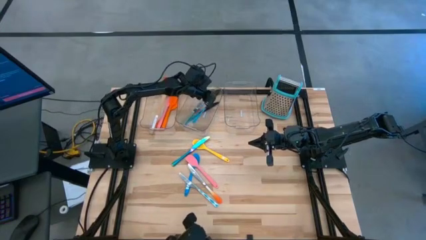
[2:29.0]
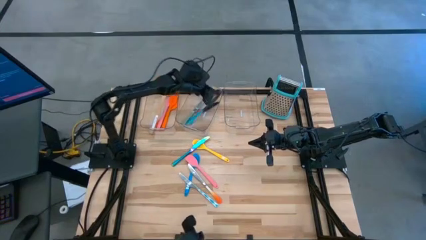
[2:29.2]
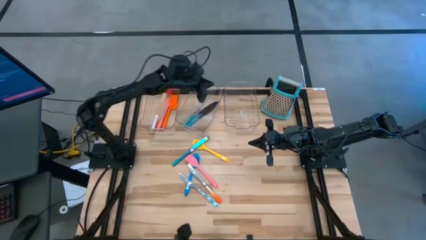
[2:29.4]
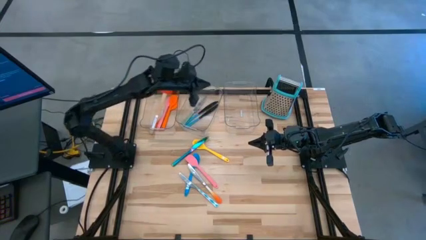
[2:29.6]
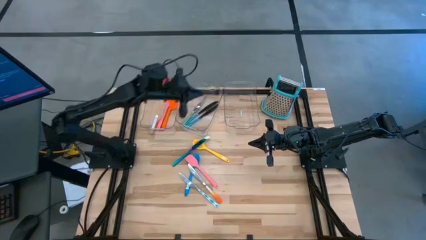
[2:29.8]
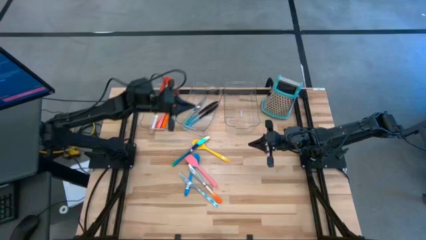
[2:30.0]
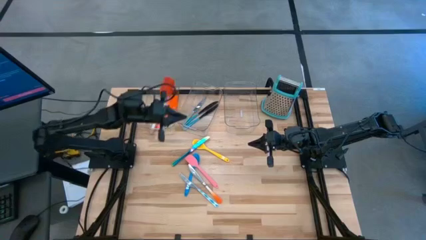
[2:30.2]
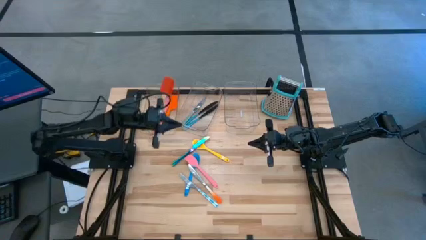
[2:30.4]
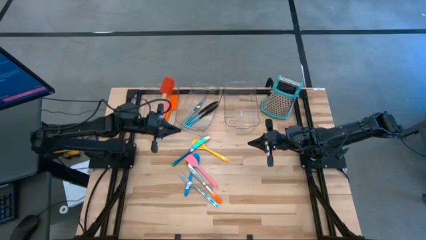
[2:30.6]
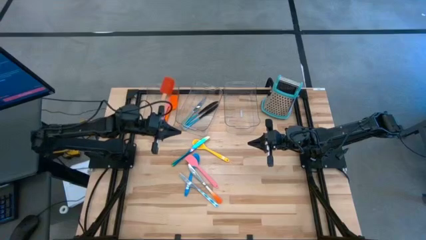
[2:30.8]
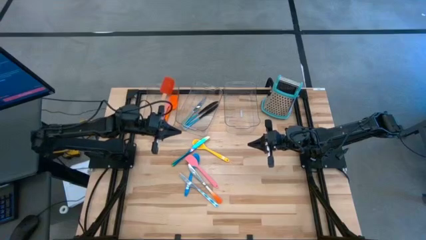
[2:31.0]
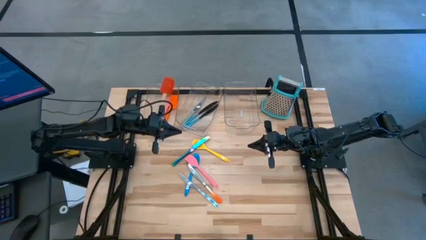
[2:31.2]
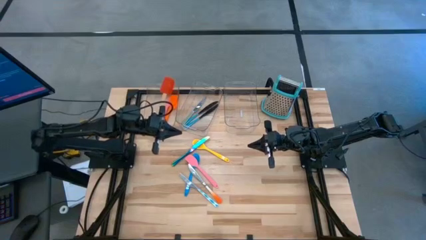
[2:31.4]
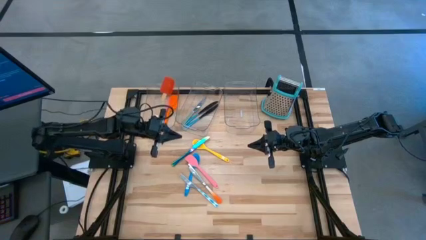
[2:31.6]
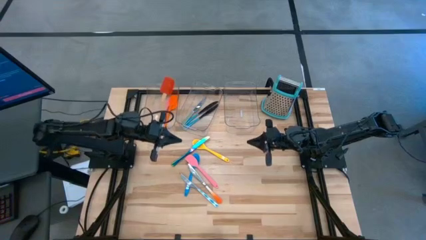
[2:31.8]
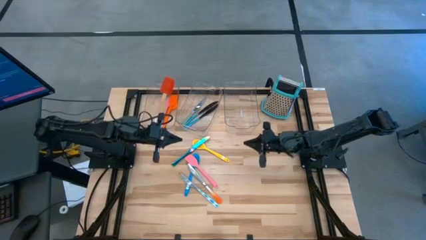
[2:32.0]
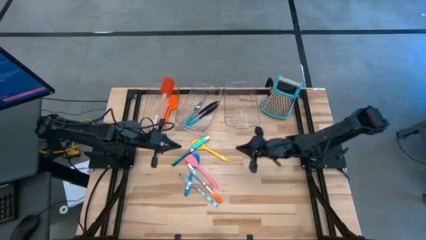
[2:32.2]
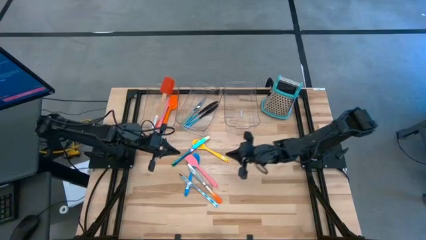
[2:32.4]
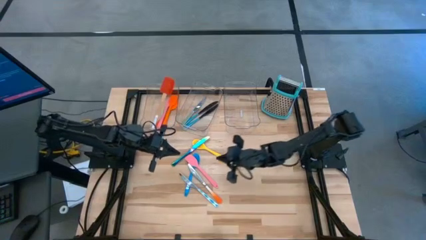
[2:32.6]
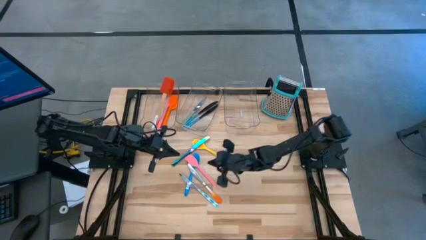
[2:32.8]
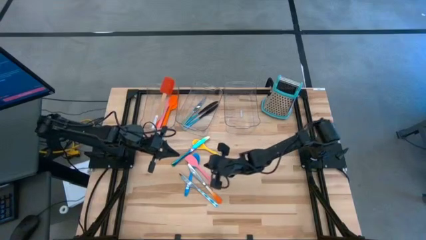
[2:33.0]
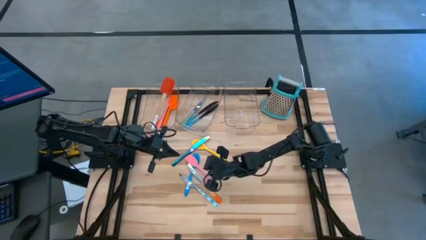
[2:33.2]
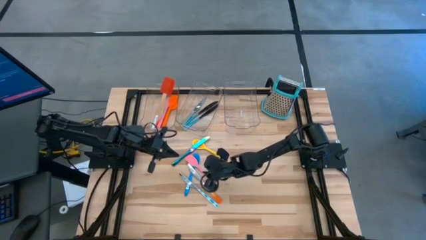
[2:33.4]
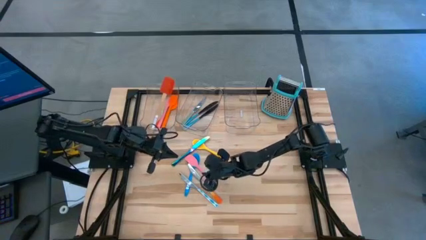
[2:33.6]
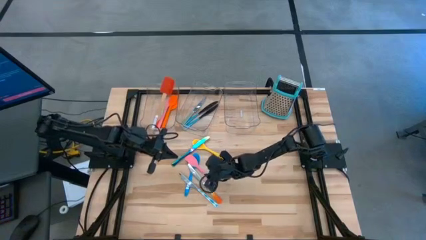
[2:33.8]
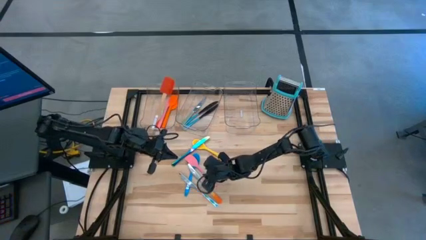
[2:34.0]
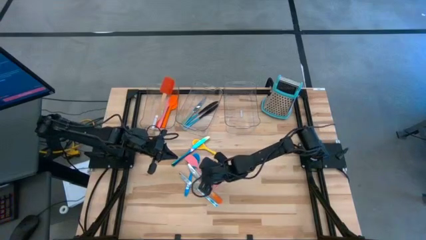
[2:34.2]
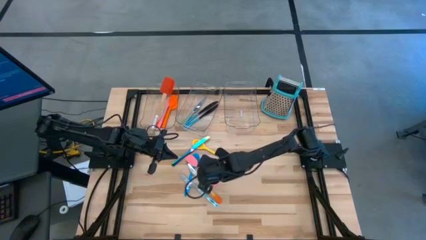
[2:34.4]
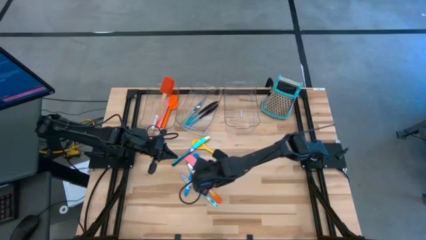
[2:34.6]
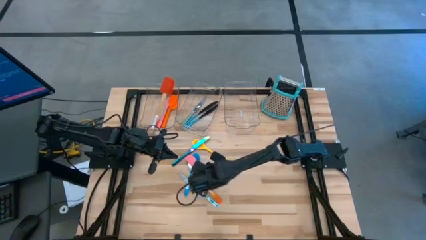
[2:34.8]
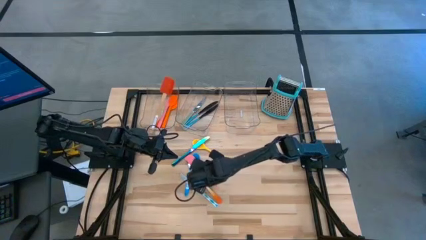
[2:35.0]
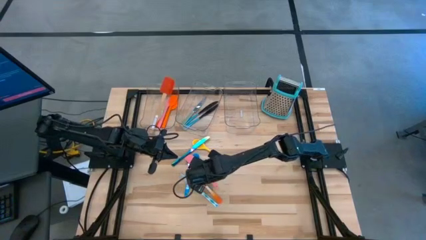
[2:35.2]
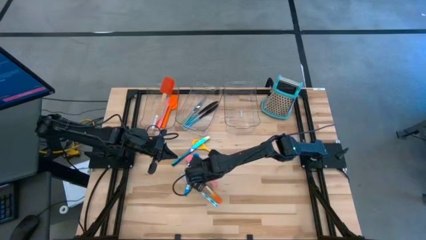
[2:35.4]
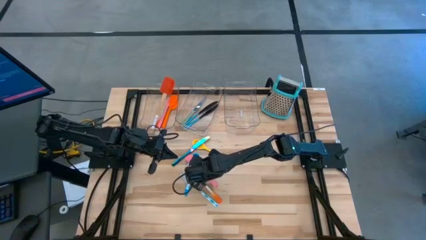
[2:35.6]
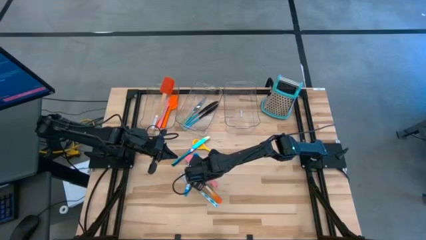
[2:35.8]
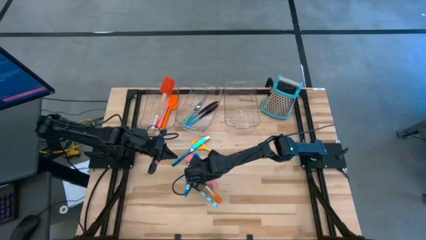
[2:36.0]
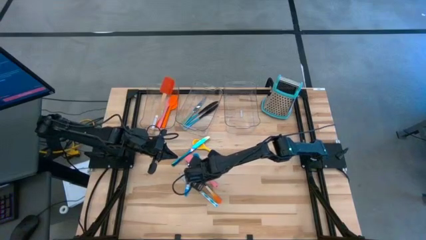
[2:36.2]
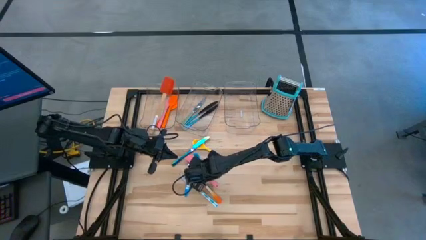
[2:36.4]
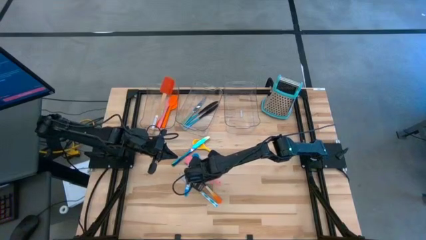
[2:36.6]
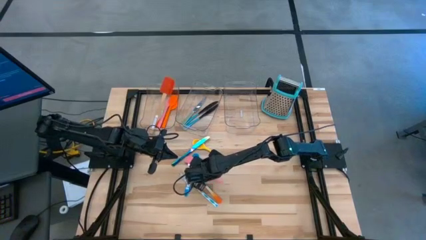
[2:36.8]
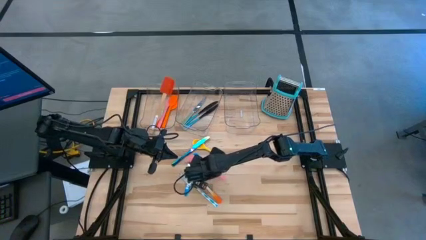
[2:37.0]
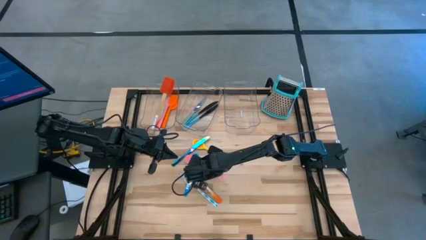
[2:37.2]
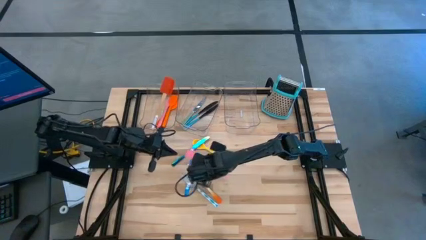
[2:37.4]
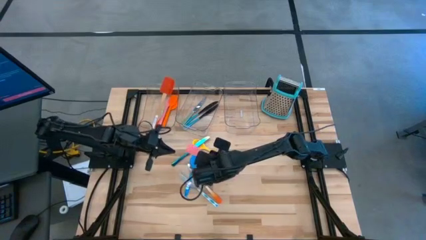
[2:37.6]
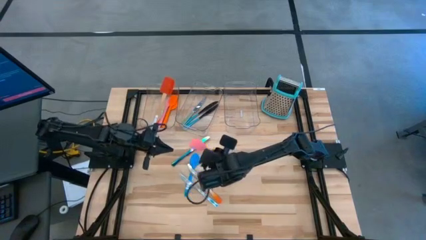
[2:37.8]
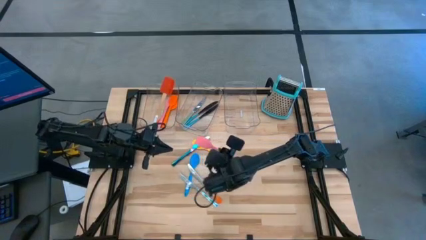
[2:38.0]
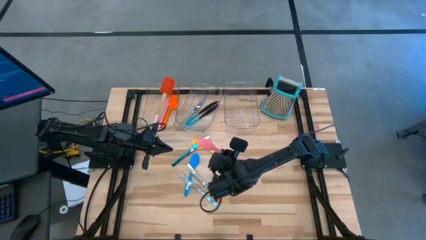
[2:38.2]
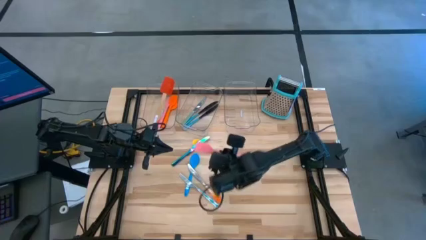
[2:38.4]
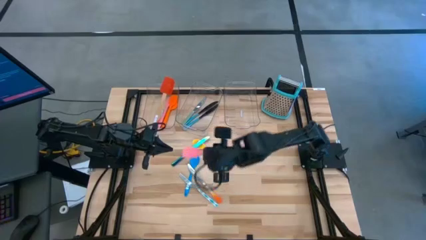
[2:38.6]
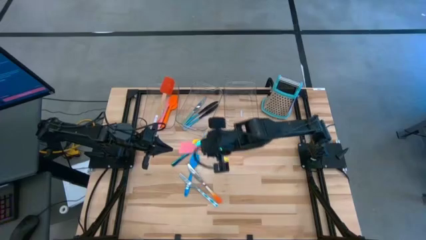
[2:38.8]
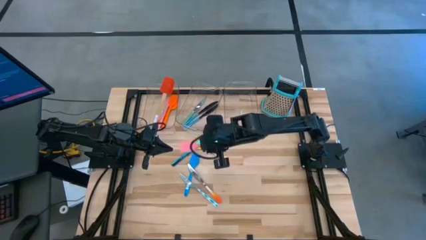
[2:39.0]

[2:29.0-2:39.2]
Task: Pick & Place Kitchen Items
Put the pink spatula into the left transparent bin

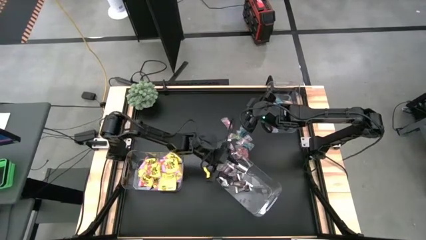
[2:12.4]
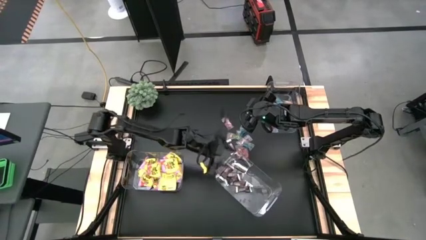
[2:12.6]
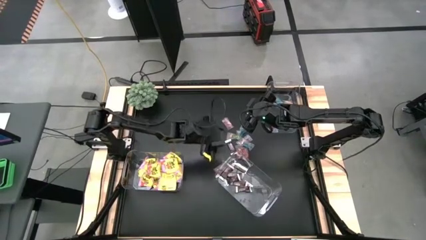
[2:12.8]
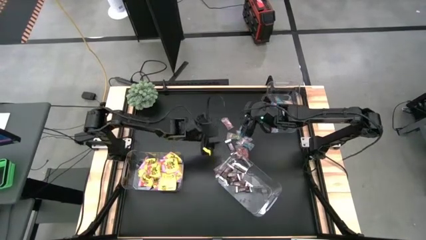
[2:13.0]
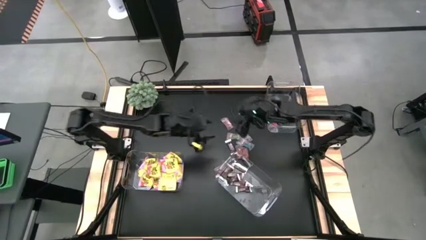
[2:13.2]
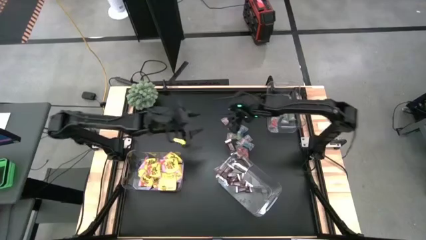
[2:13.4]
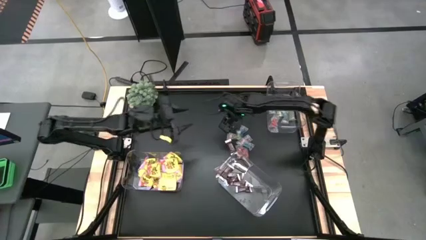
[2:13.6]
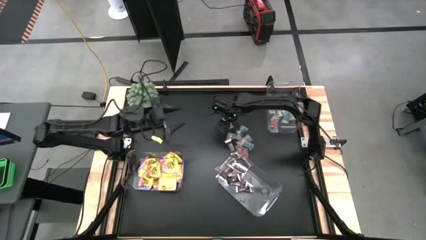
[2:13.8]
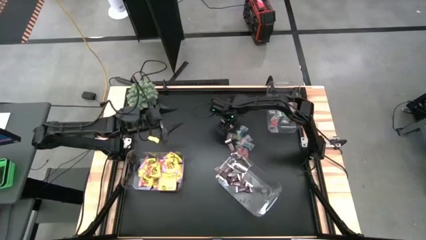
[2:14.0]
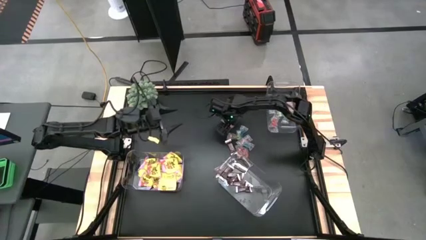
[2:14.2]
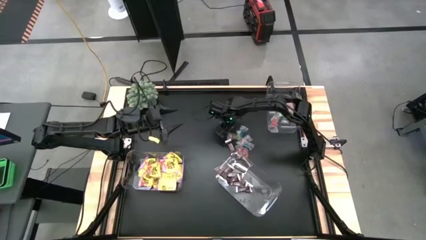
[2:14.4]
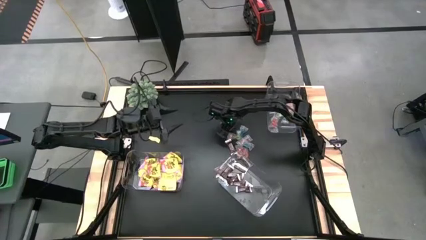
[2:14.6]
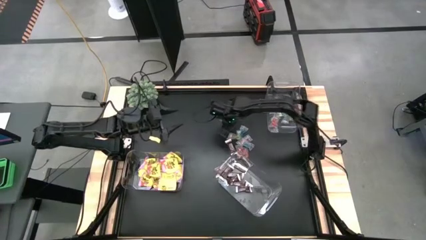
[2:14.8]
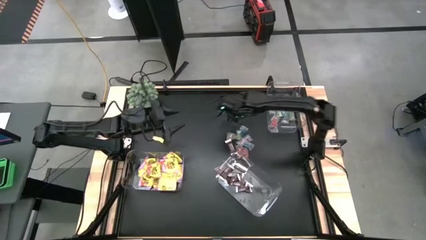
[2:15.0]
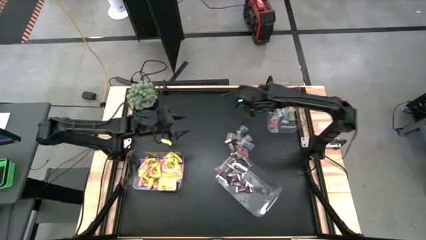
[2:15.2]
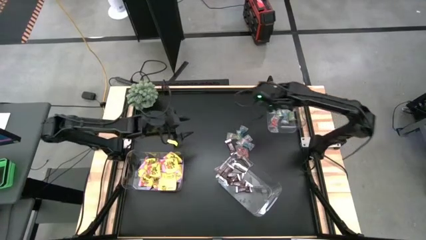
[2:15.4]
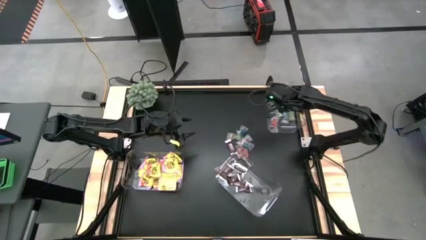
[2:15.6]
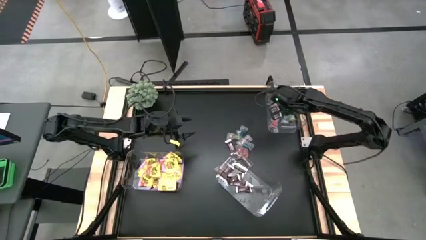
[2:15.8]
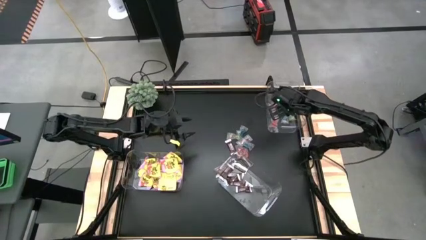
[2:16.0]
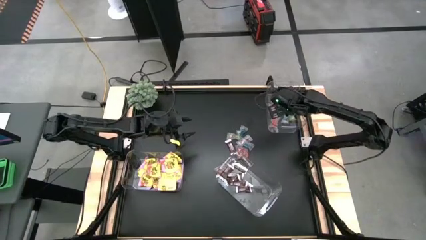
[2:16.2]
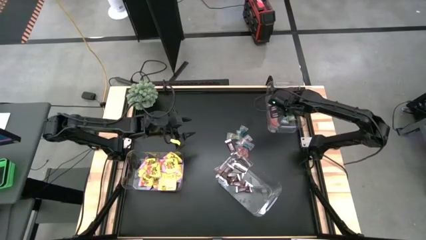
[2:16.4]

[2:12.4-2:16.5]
Task: Sort candy
Put the red candy in the top right transparent container

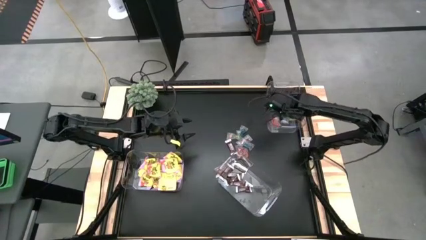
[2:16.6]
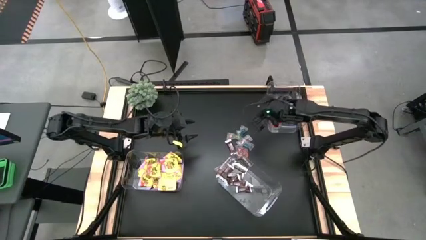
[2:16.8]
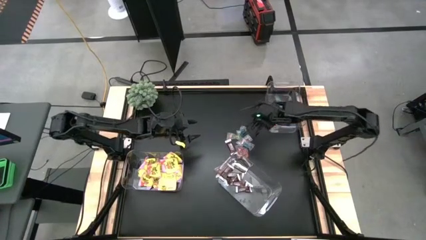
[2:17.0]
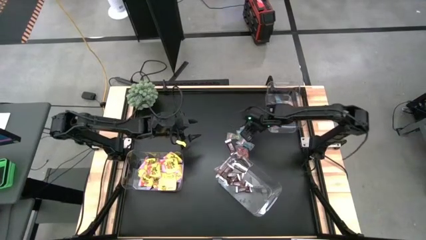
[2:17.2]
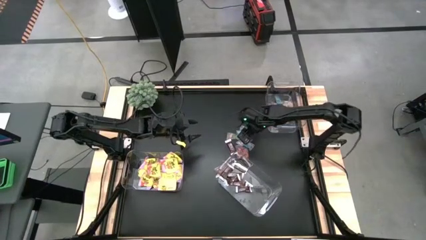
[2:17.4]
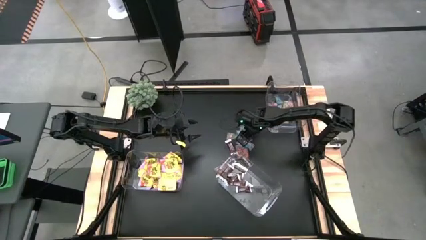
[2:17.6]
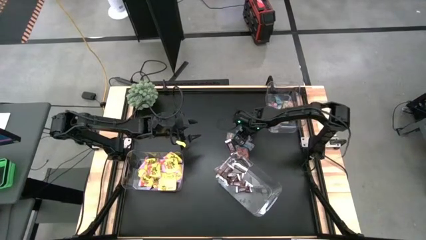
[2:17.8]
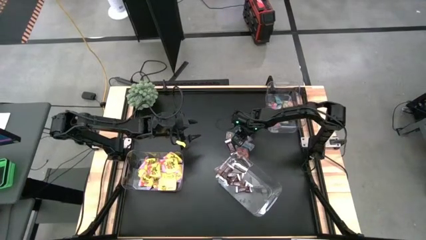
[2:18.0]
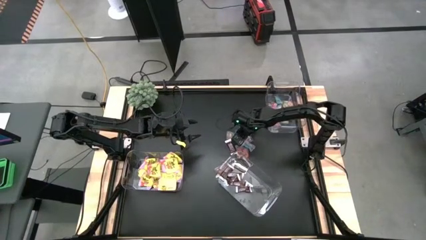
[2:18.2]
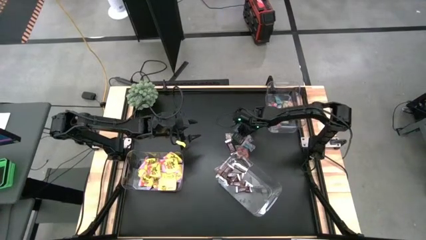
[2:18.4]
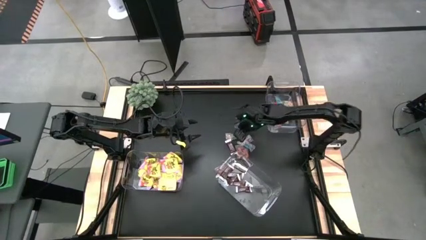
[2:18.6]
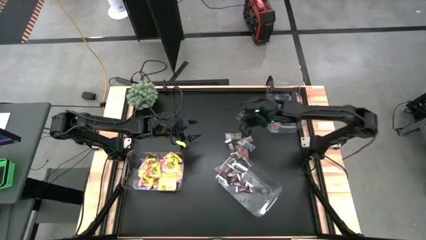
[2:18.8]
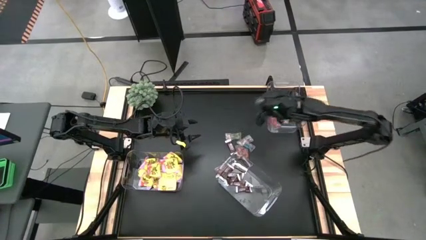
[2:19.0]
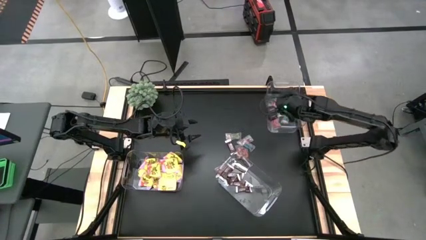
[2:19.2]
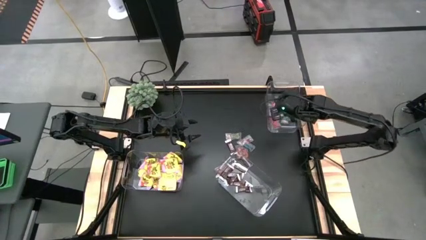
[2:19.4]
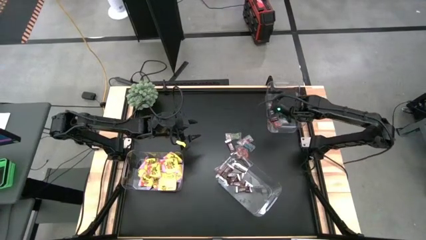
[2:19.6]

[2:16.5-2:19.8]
Put the blue candy in the top right transparent container
